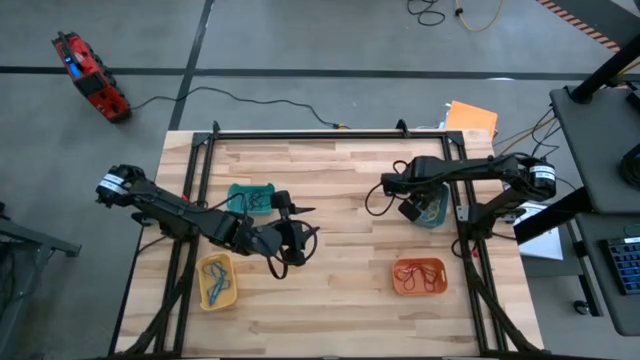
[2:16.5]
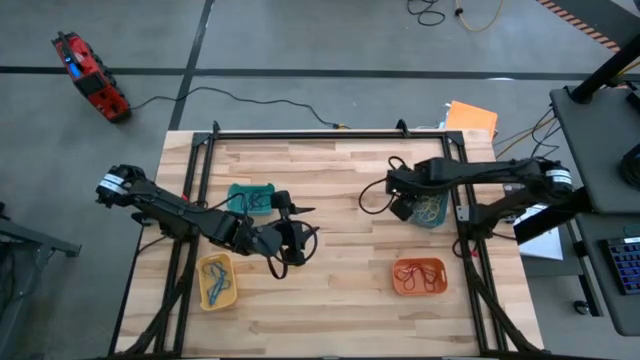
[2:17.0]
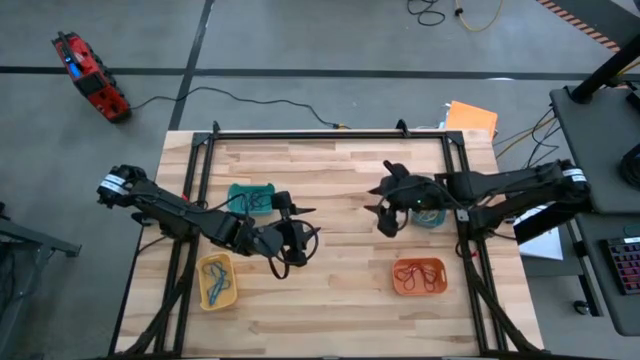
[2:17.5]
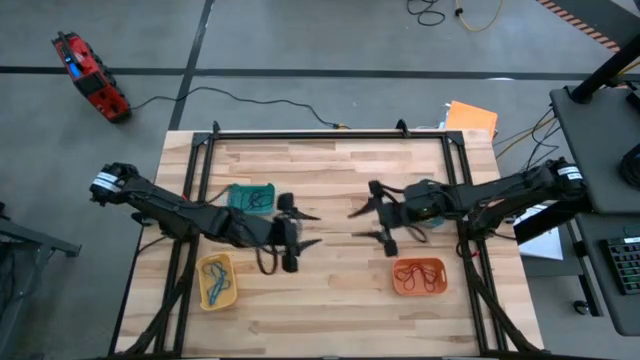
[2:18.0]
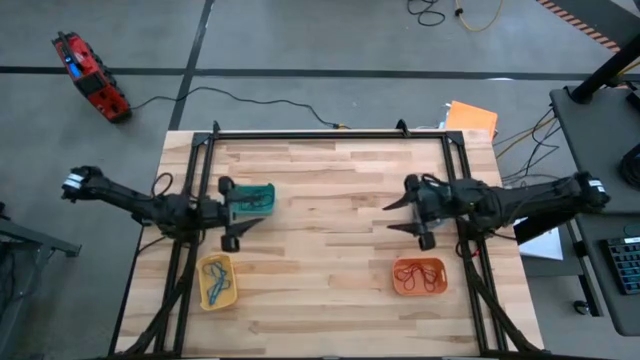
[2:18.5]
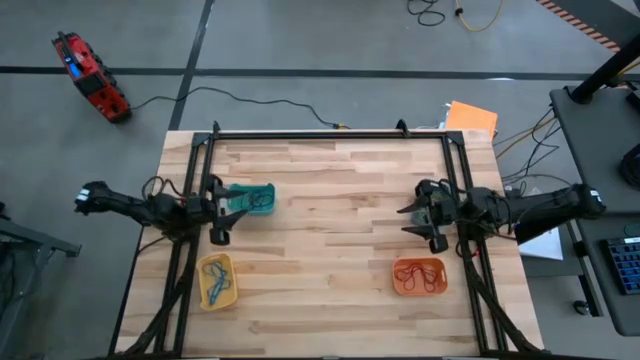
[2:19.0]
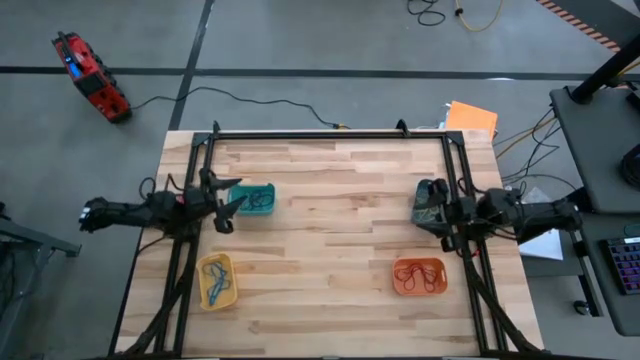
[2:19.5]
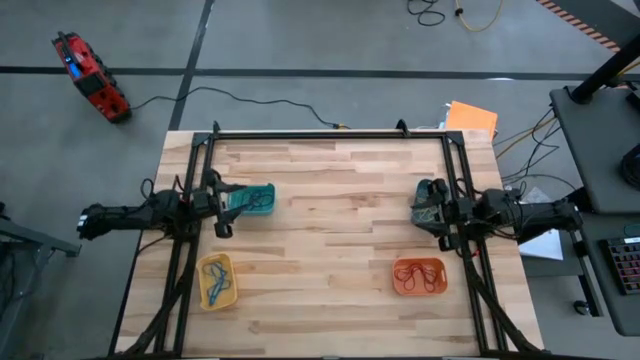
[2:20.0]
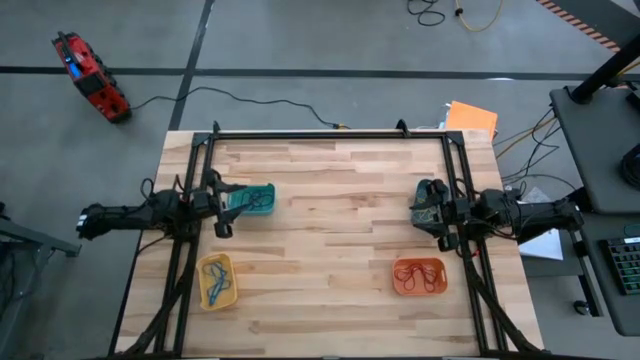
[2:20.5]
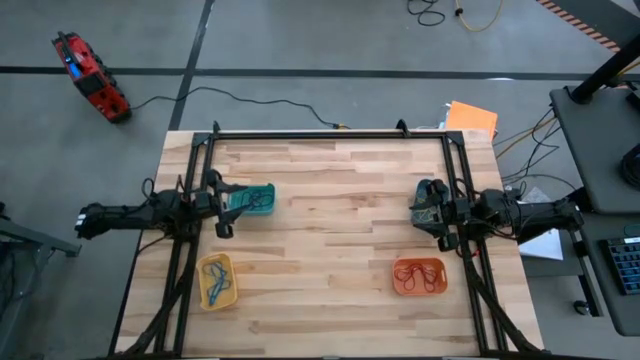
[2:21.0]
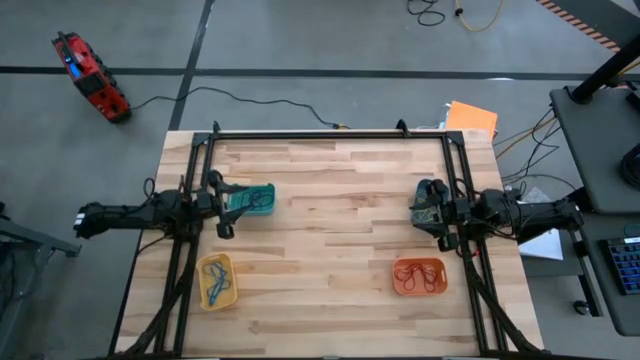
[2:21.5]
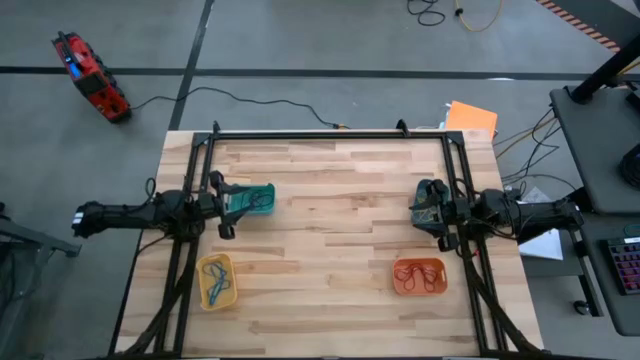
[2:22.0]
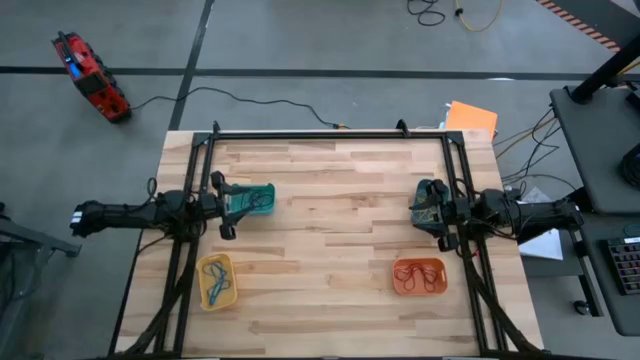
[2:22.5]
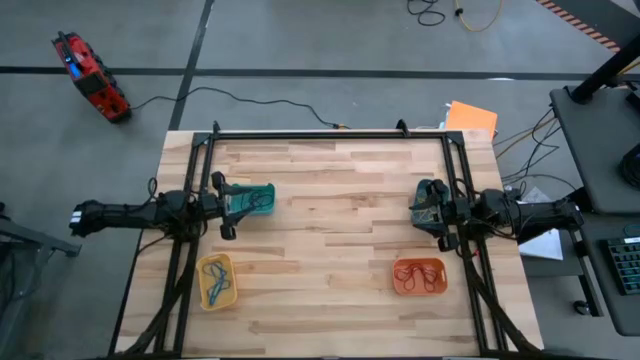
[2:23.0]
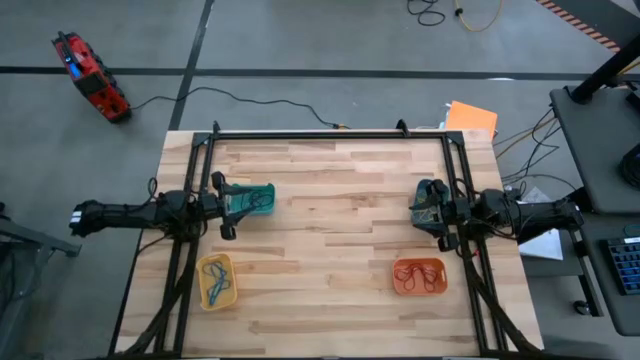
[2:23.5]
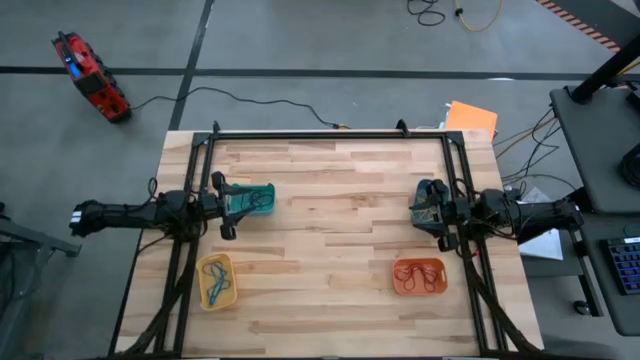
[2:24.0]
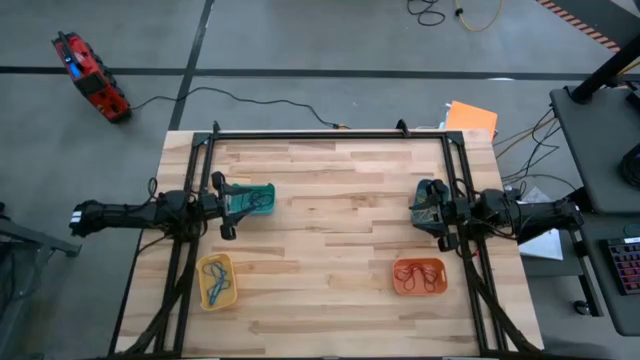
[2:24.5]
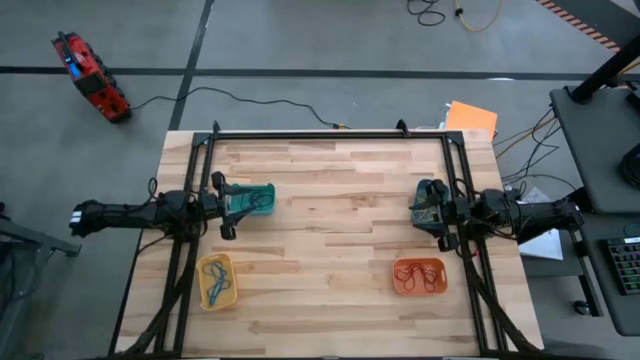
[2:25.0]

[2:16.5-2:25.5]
Task: Sort rubber bands into baskets
Return to Home Position

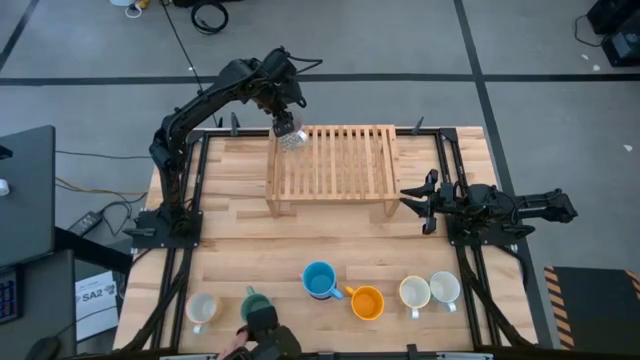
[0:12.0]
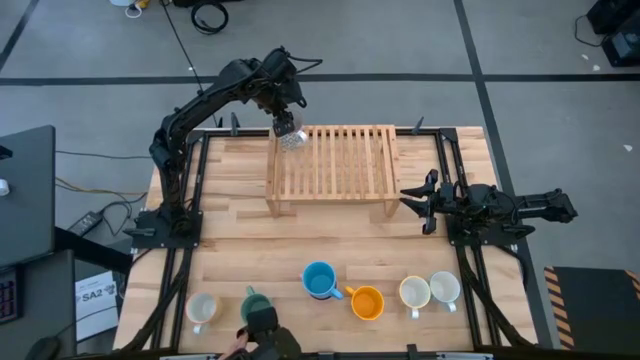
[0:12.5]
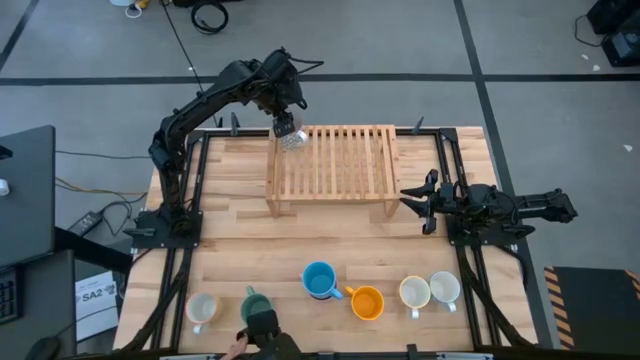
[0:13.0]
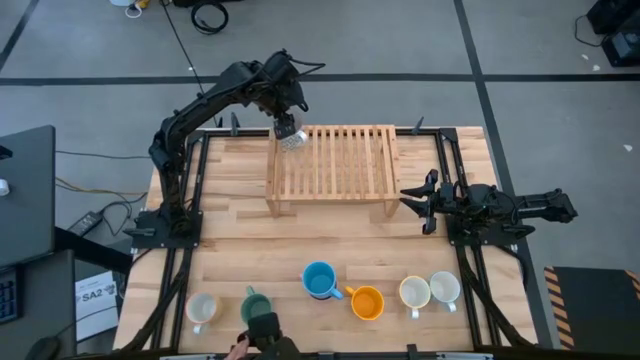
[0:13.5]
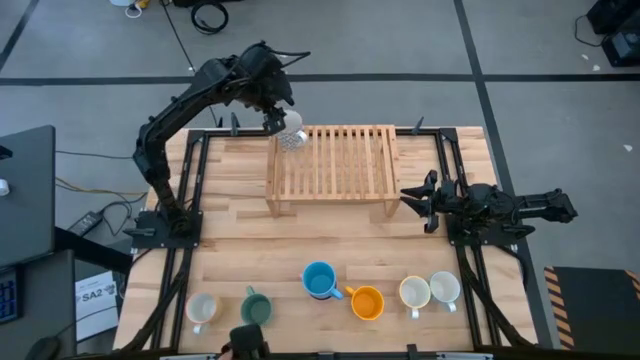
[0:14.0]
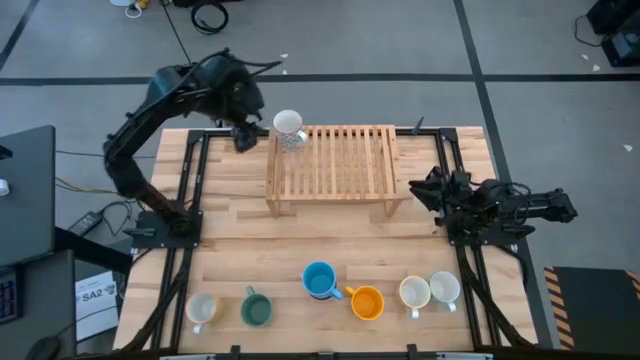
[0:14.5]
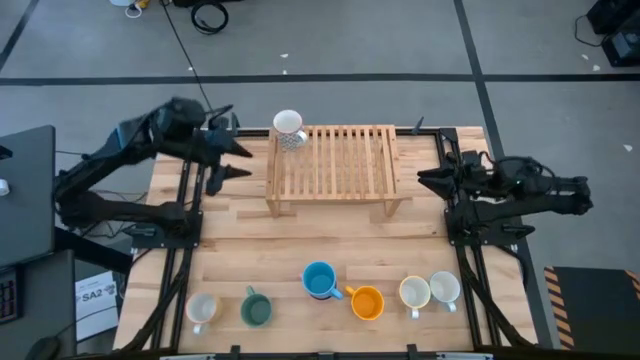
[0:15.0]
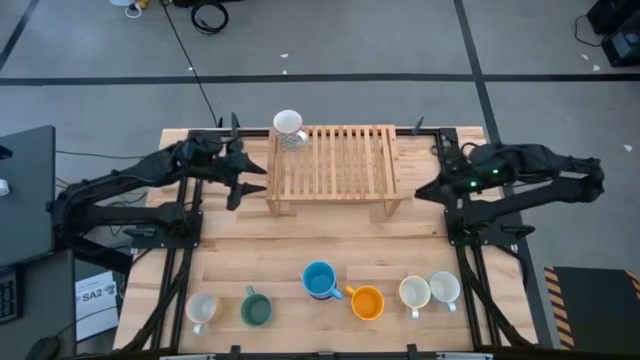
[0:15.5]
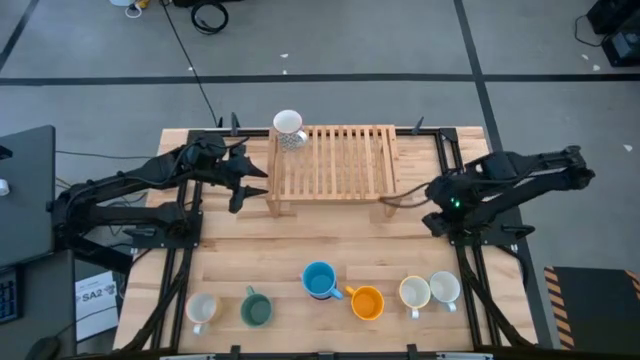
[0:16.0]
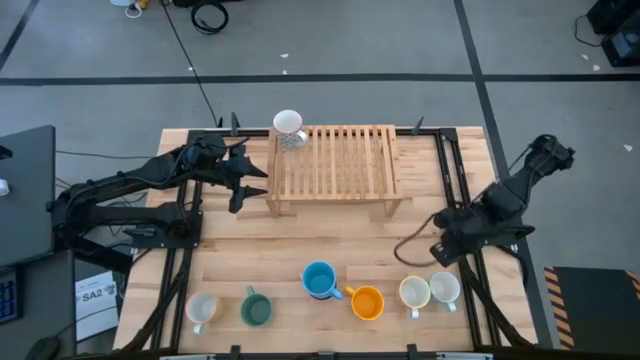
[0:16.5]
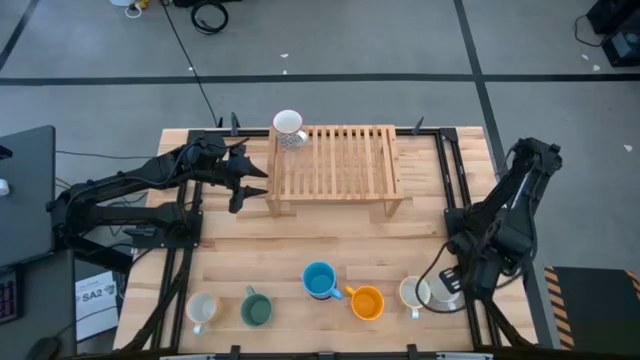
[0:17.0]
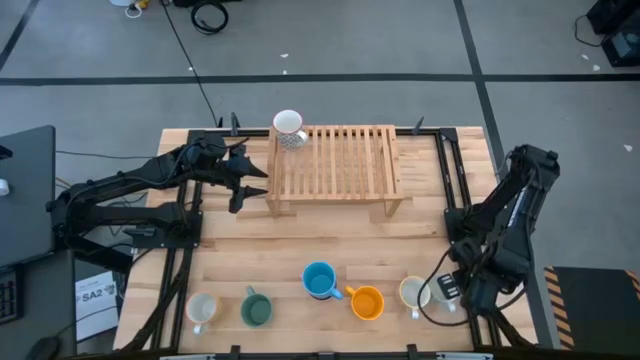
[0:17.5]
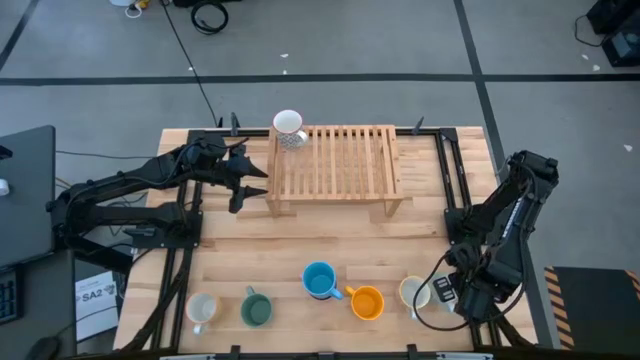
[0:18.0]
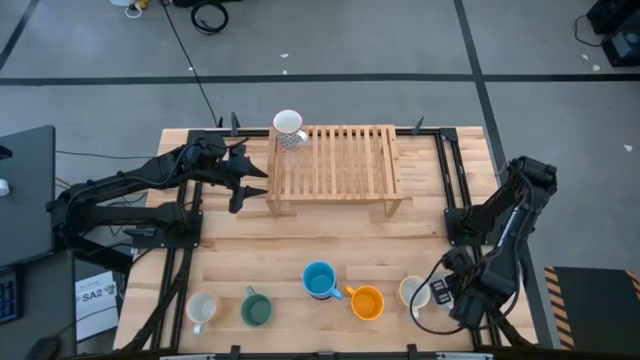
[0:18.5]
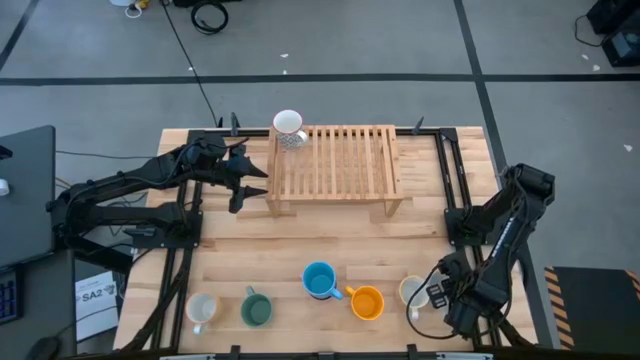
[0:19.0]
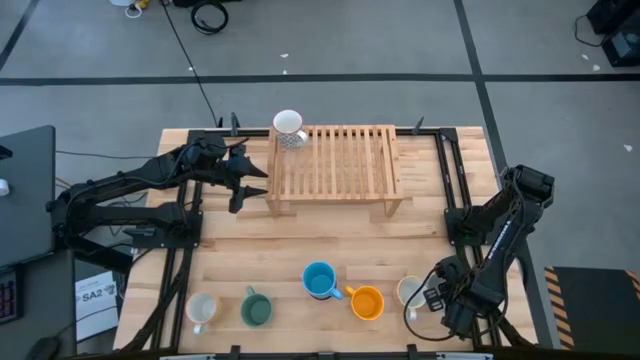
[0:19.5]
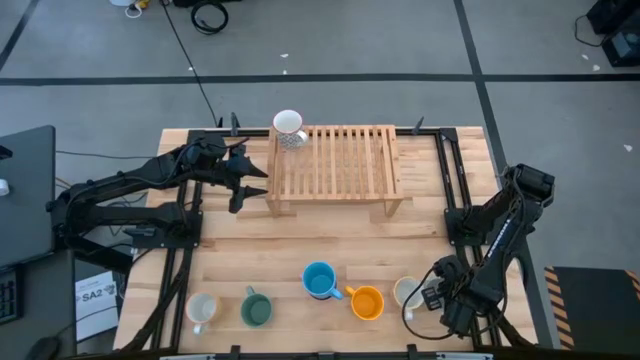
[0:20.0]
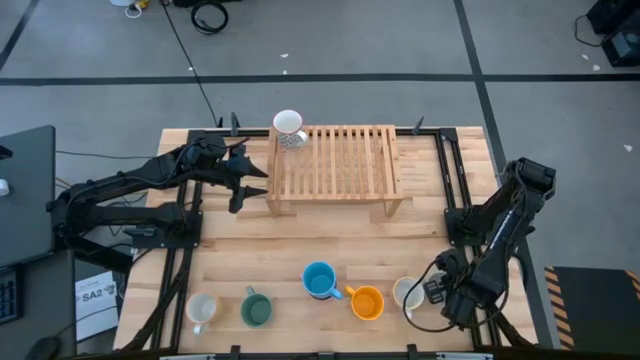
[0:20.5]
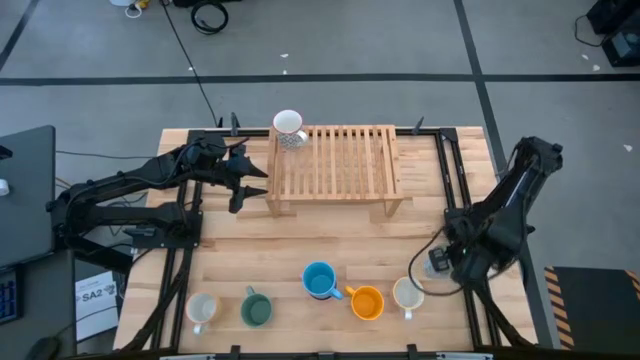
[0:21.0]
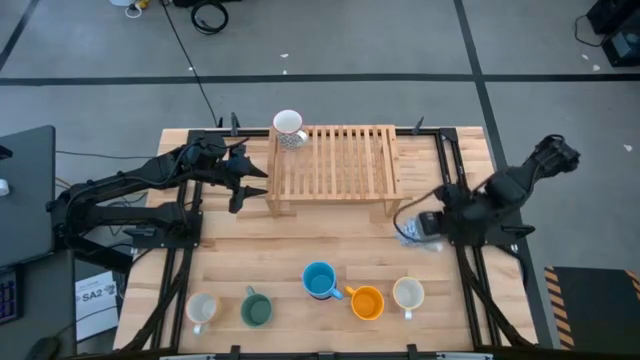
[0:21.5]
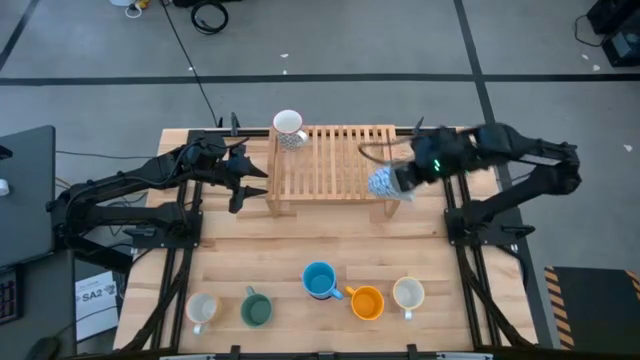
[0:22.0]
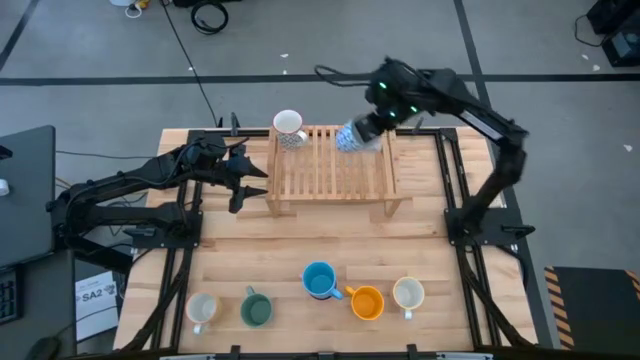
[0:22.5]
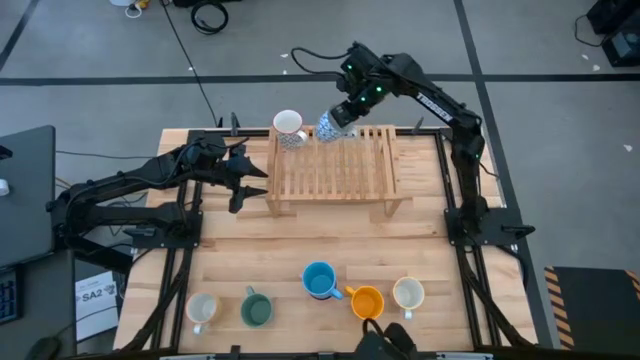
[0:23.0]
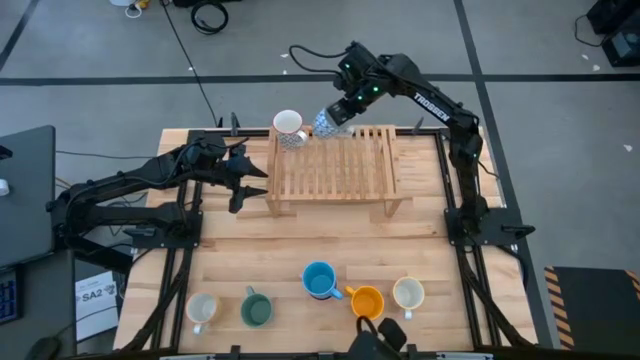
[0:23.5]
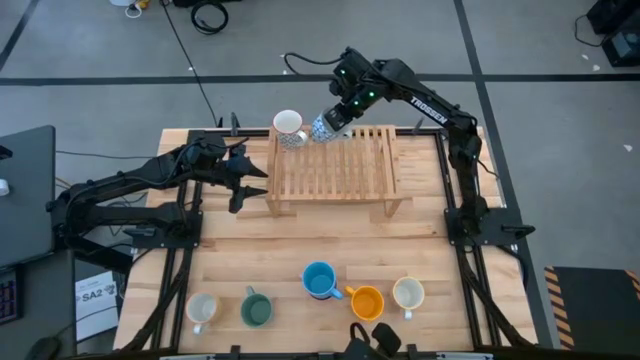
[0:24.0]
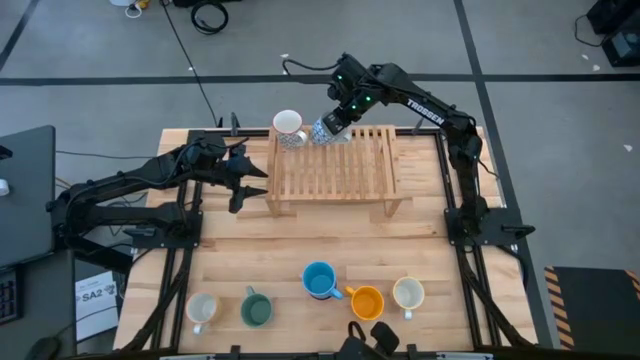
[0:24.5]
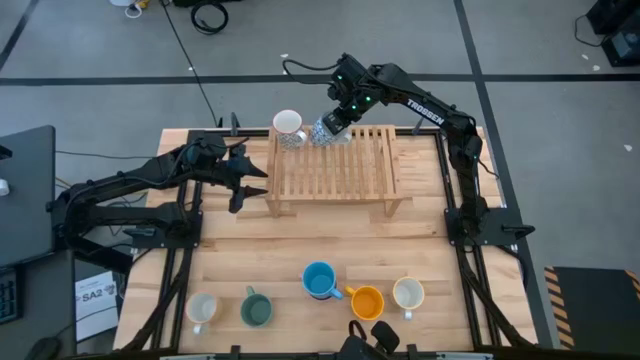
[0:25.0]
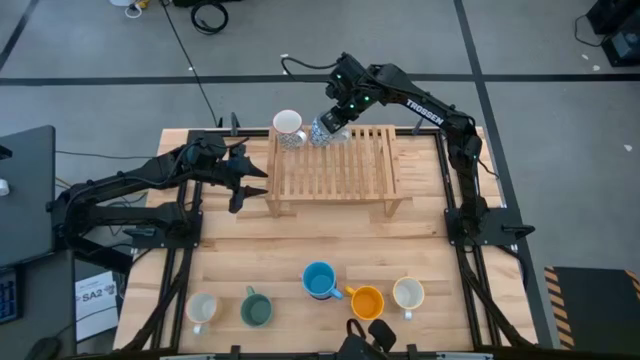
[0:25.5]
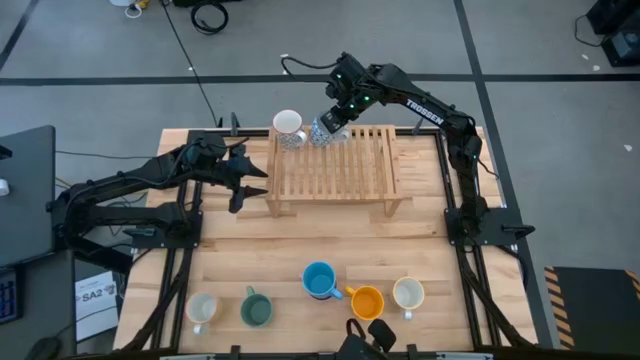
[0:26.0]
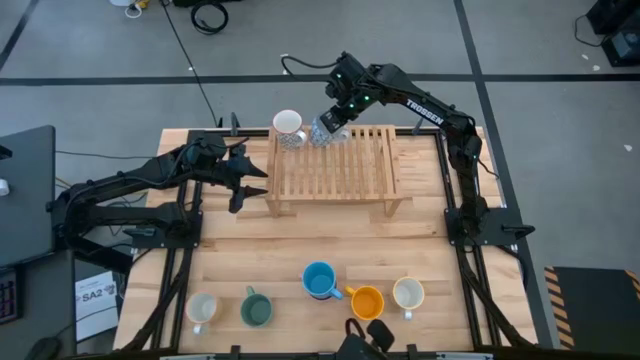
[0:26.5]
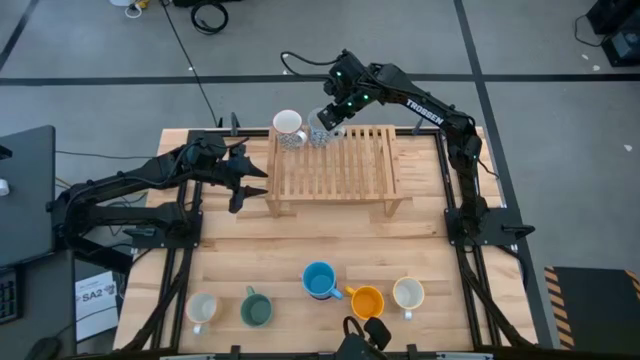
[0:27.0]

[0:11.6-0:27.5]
Task: Place coffee mugs
Put the right blue mug on the shelf
